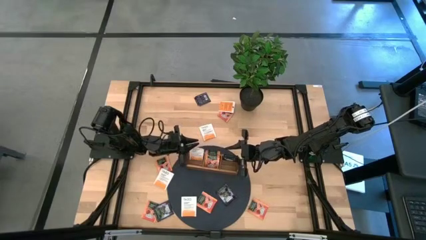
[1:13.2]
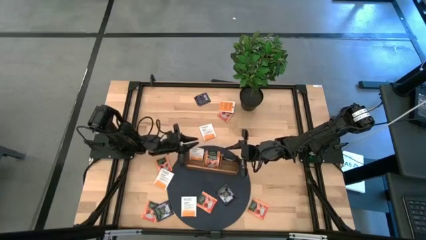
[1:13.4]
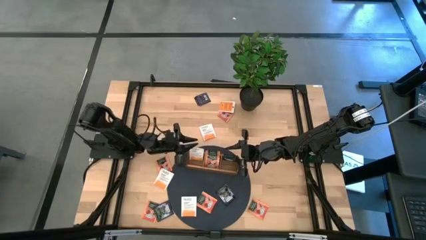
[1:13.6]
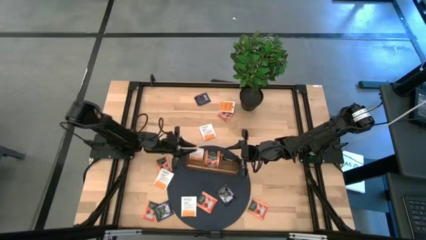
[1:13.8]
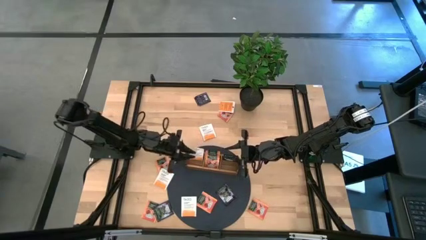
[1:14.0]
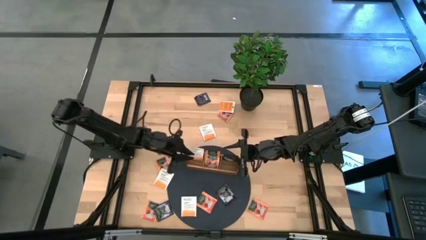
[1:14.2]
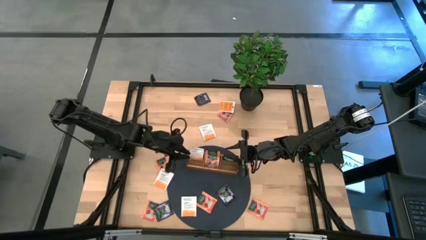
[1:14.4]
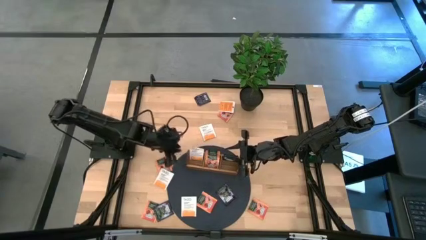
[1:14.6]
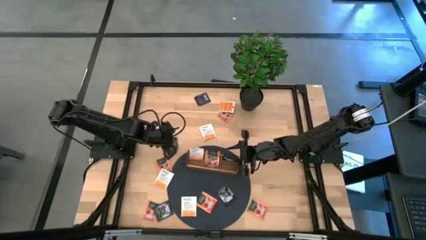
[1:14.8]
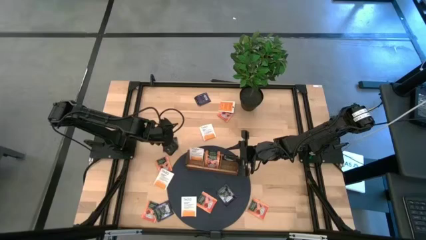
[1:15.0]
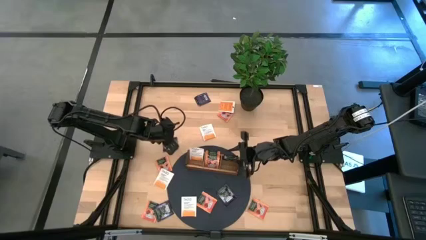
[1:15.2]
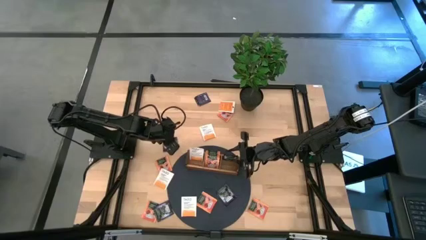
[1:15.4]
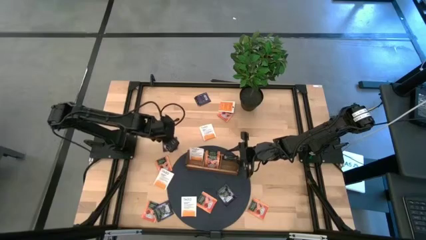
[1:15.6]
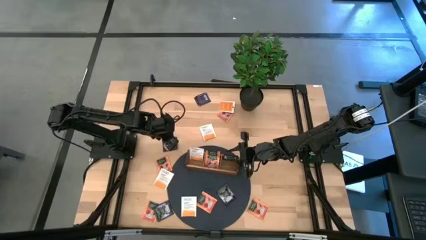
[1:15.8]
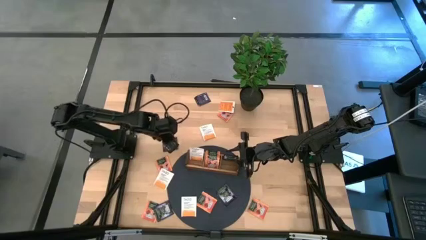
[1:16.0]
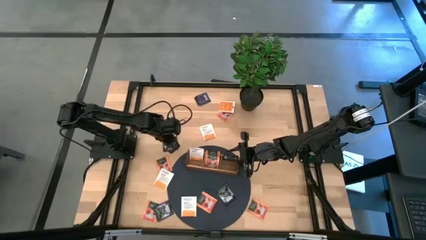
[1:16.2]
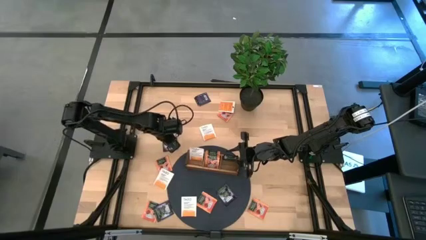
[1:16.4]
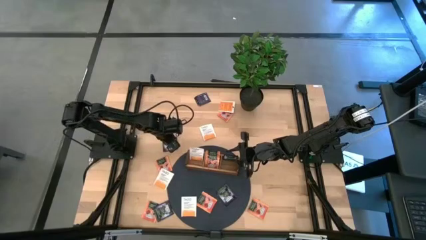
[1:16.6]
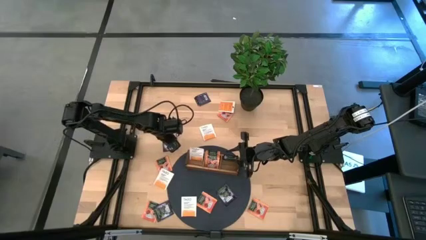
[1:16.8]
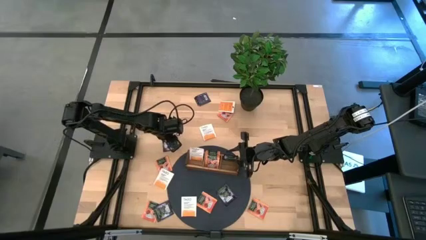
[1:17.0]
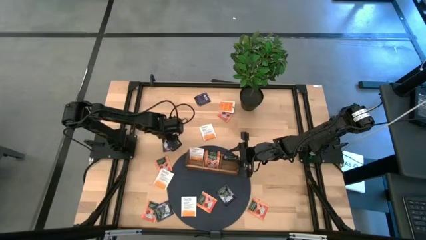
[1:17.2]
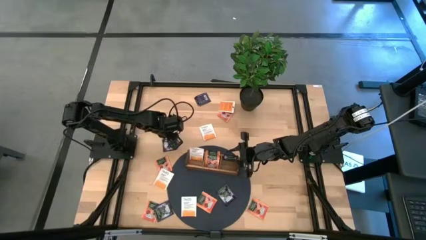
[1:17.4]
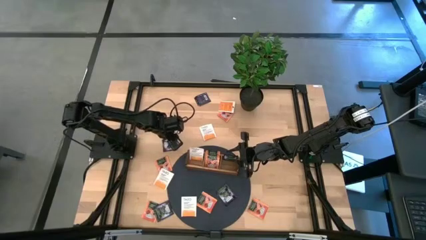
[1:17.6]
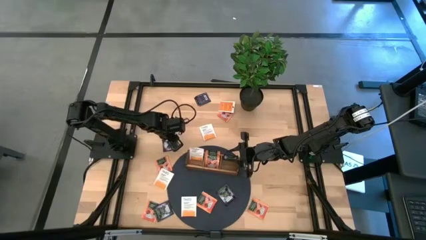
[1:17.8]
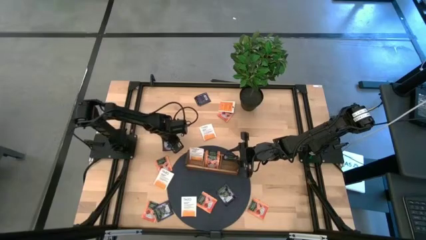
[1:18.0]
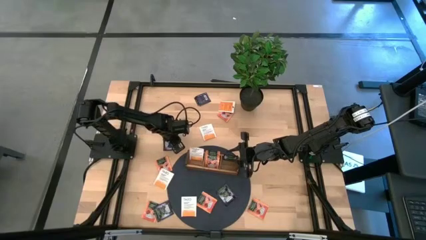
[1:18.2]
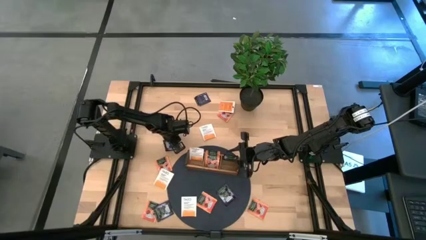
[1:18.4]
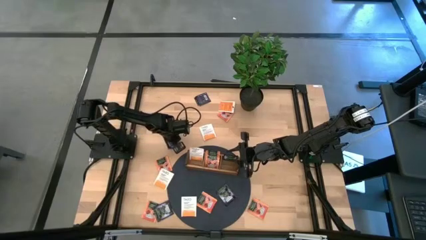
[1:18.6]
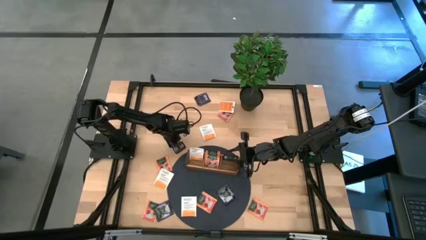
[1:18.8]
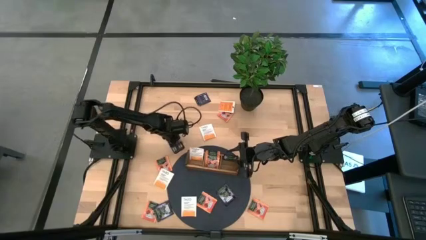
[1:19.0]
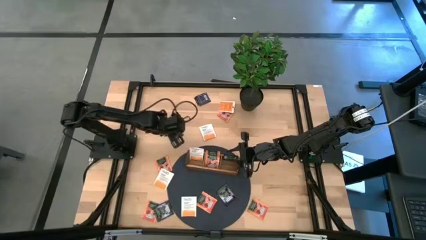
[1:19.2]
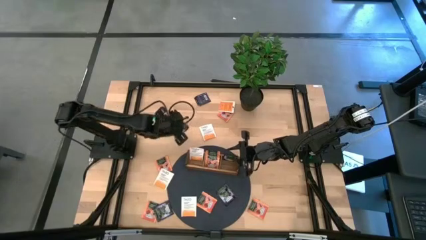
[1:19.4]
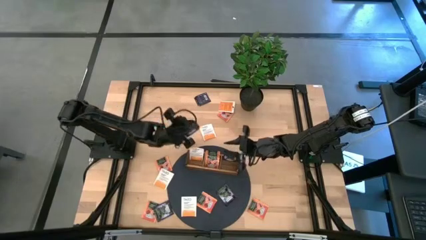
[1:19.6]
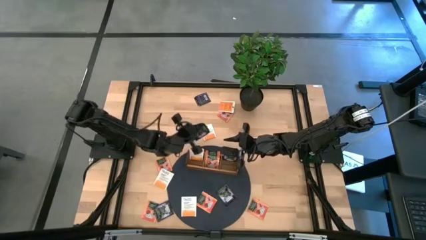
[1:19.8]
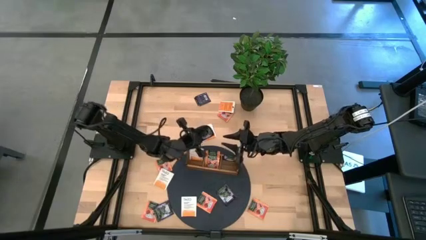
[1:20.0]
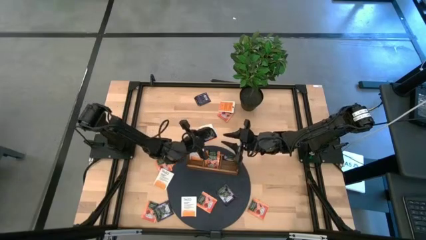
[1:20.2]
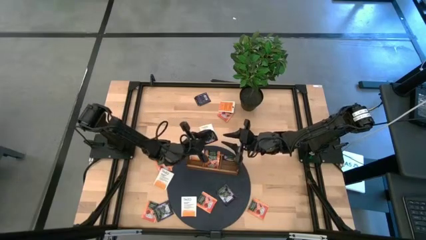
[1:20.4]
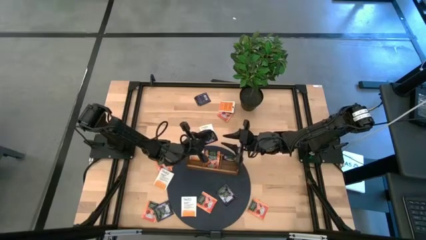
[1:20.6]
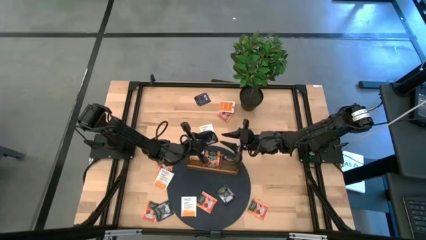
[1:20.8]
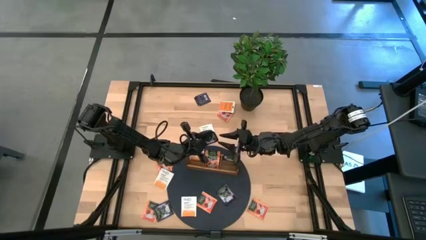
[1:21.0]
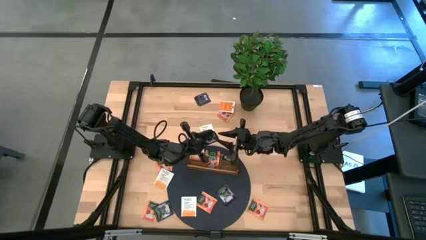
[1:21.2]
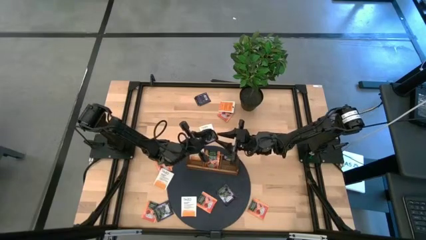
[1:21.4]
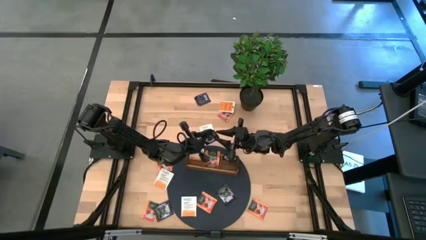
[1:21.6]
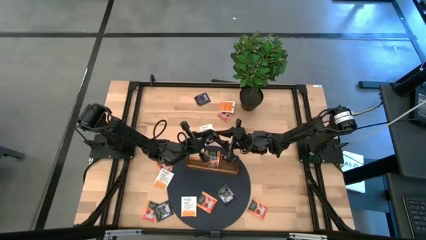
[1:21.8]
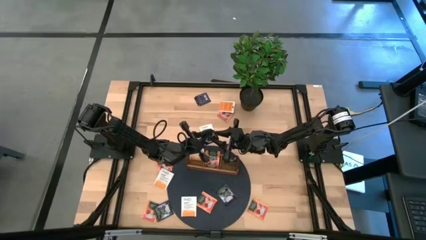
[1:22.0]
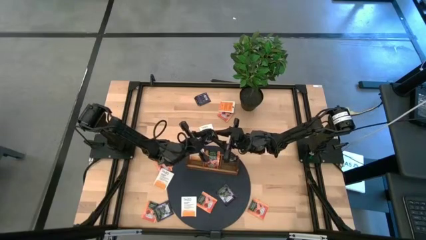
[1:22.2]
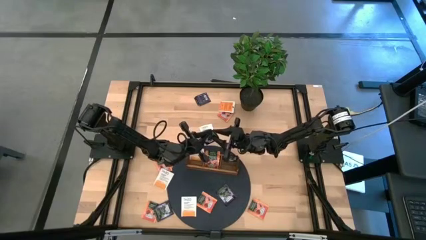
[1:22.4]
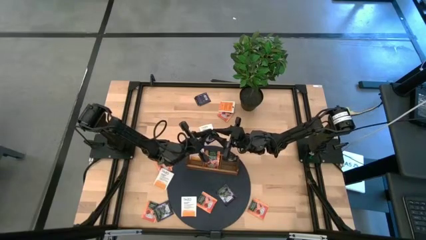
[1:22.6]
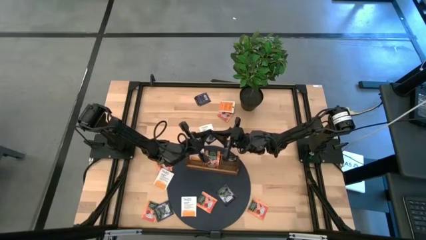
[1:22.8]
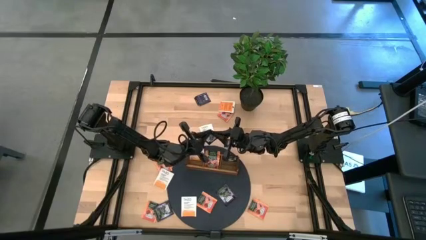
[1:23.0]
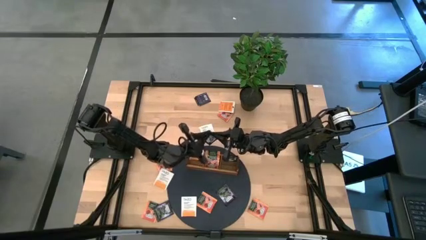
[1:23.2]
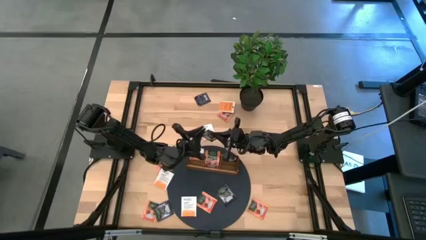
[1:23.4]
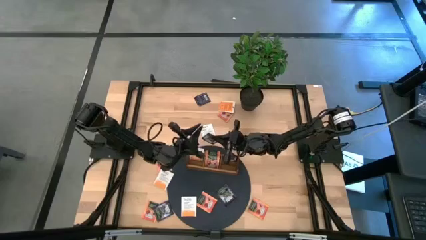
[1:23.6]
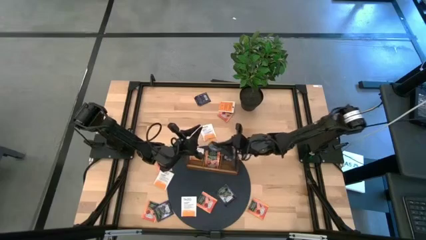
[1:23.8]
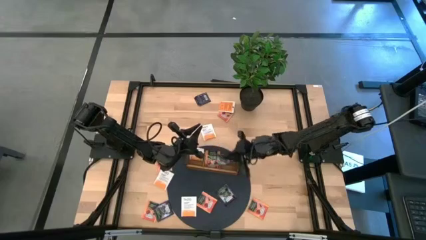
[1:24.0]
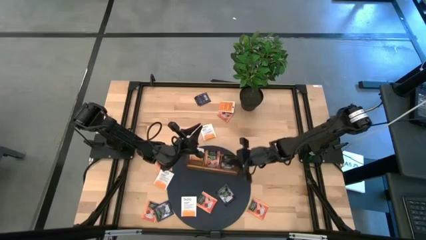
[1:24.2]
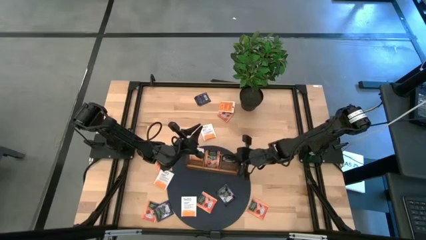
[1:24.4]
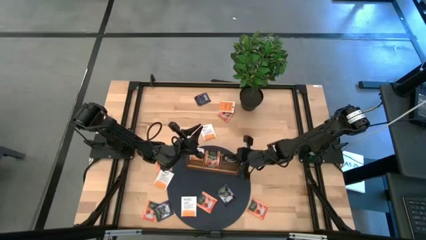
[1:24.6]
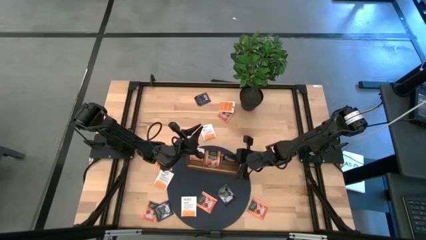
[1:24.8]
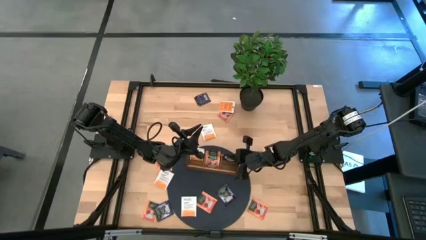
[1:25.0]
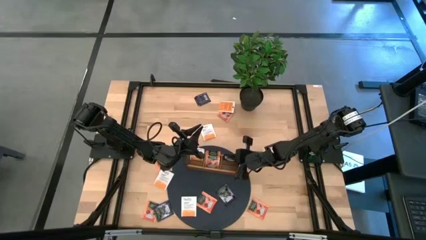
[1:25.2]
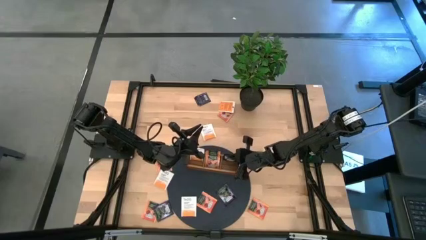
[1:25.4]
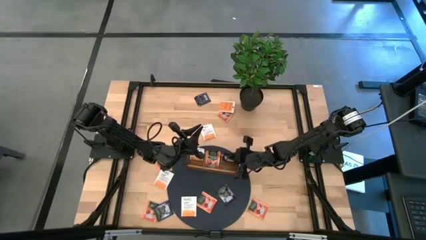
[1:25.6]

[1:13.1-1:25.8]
Task: Pick & Place Tea
Put the black white tea bag into the right section of the wooden organizer

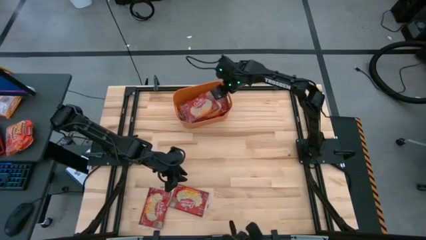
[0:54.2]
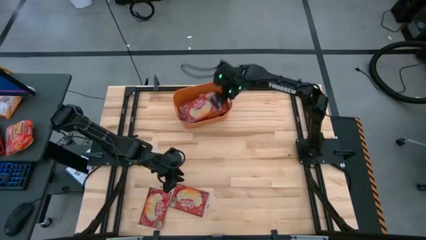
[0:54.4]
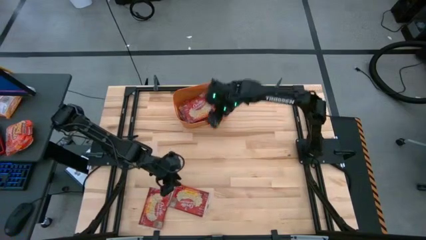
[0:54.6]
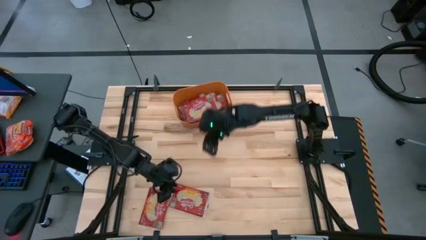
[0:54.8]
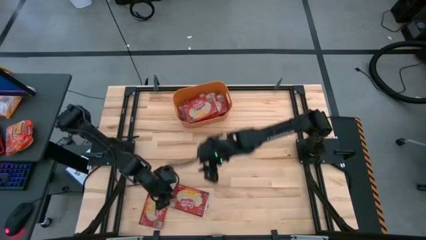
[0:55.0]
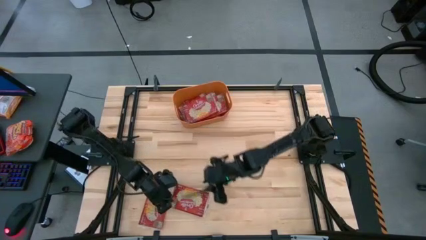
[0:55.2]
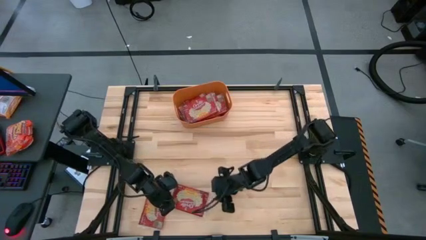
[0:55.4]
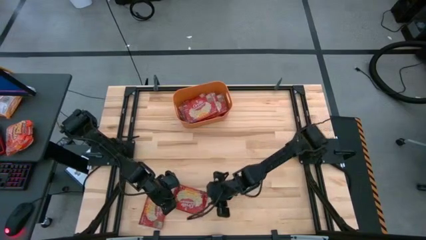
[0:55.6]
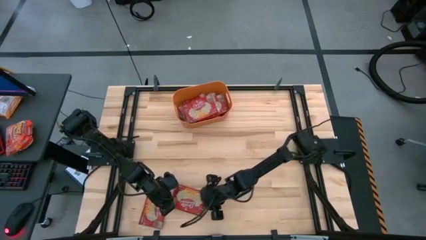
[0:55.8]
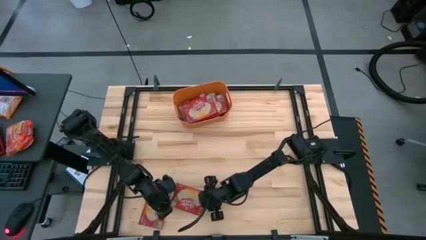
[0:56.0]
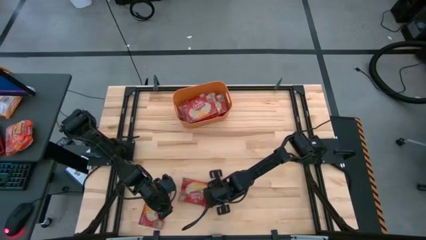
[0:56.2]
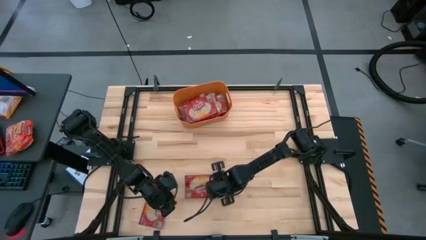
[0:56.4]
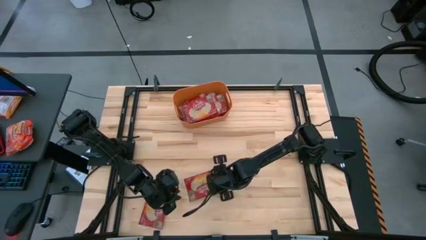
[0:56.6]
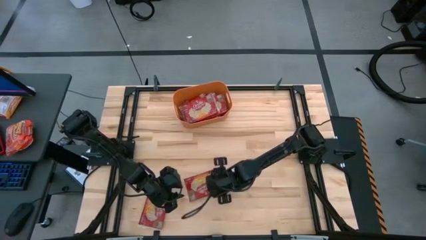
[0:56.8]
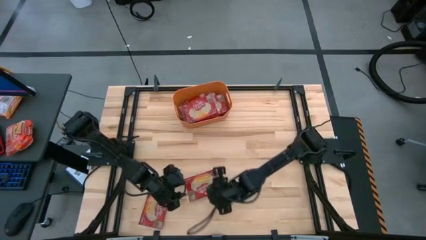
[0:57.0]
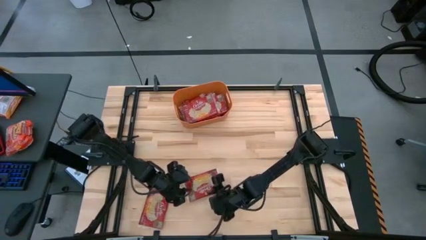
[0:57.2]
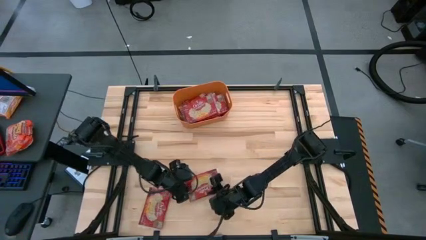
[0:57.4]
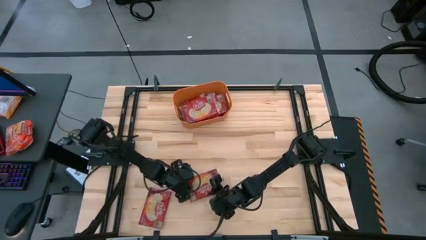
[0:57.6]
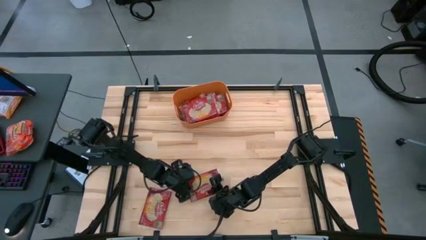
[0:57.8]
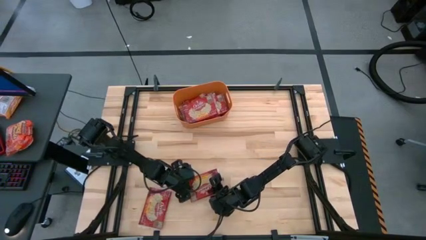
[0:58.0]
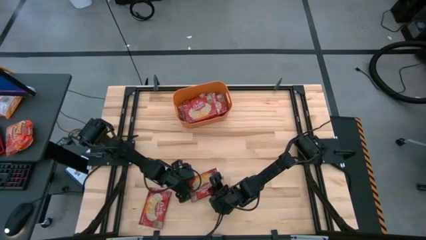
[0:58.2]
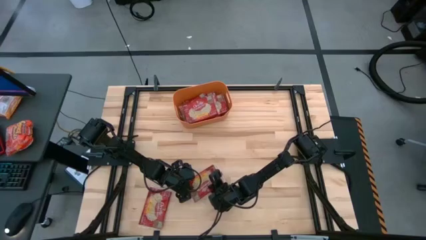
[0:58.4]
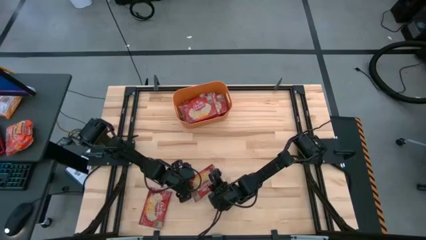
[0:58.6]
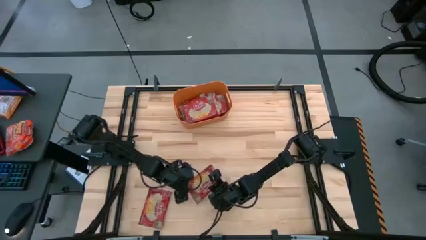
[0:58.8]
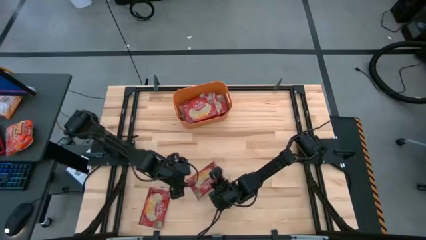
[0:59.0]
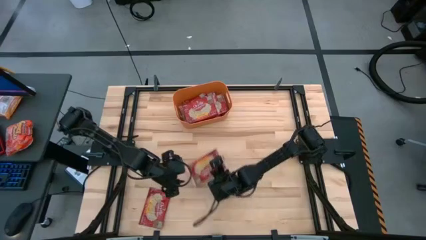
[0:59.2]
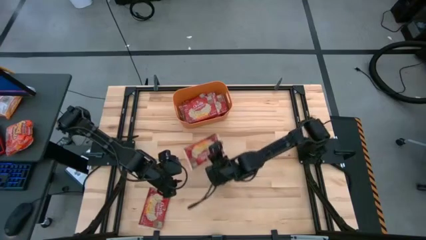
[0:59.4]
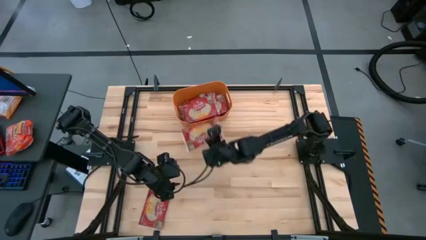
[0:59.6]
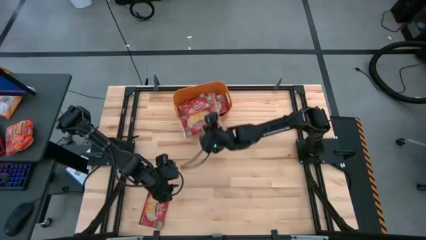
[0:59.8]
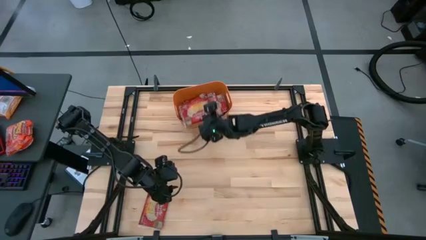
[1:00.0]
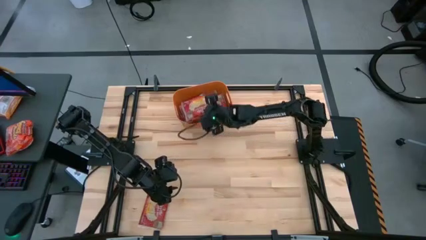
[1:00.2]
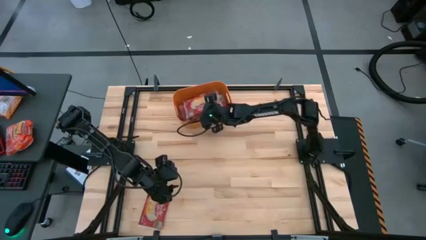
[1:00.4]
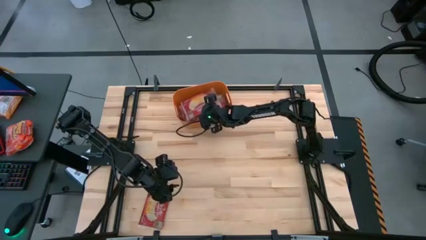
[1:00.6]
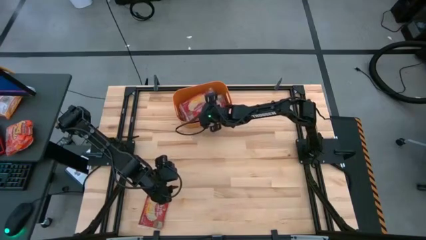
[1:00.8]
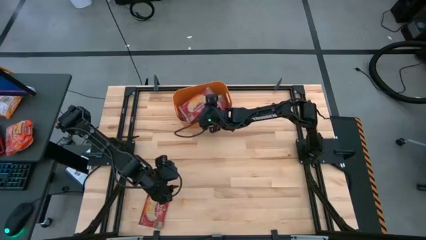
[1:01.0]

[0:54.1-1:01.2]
Task: Sort popcorn bags into baskets
Put the red popcorn bag into the orange bin
